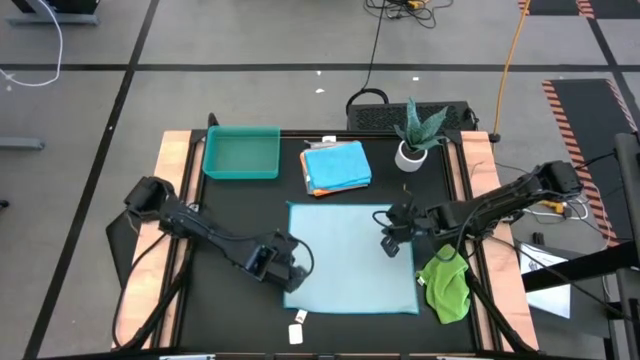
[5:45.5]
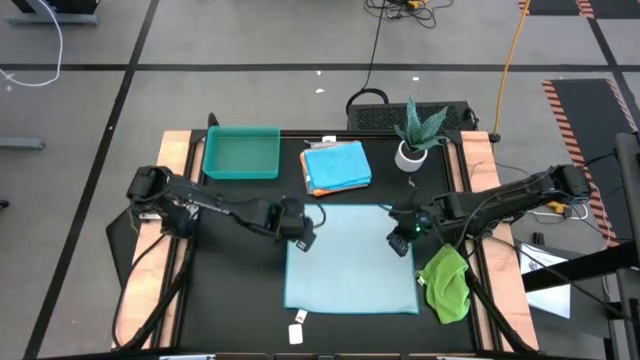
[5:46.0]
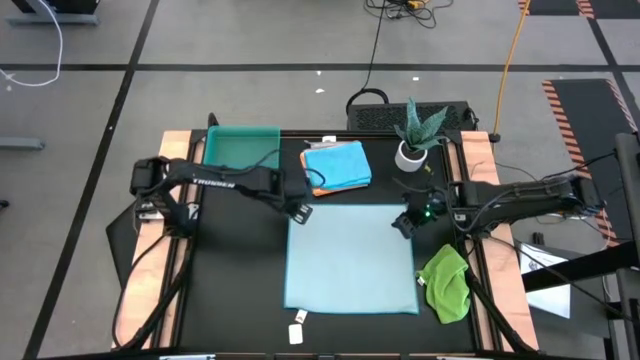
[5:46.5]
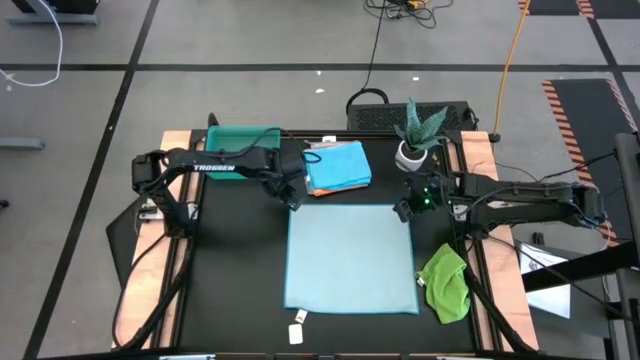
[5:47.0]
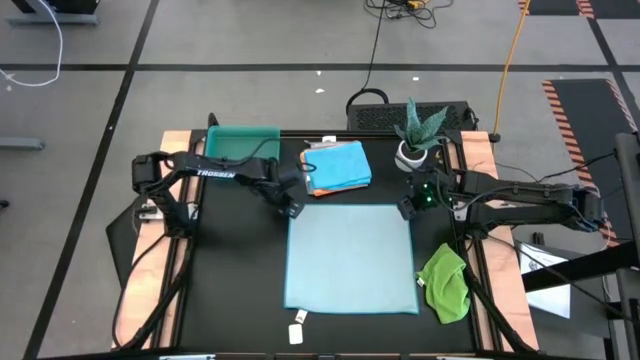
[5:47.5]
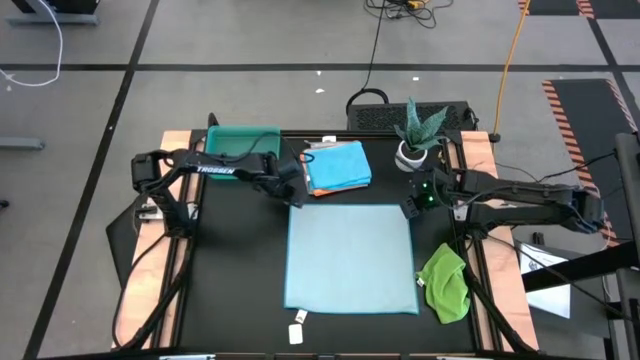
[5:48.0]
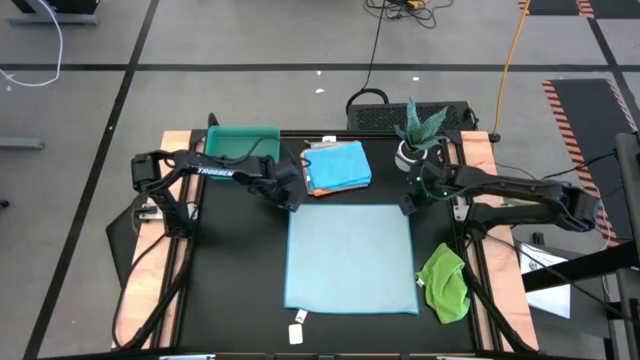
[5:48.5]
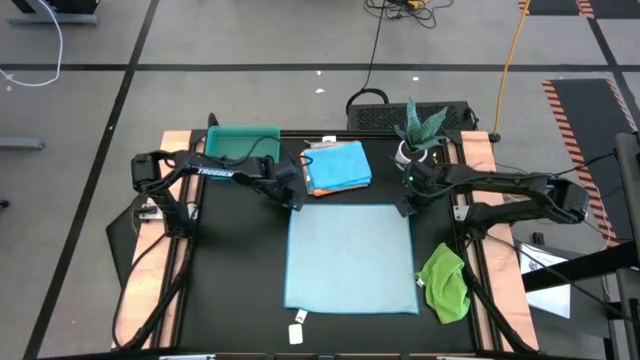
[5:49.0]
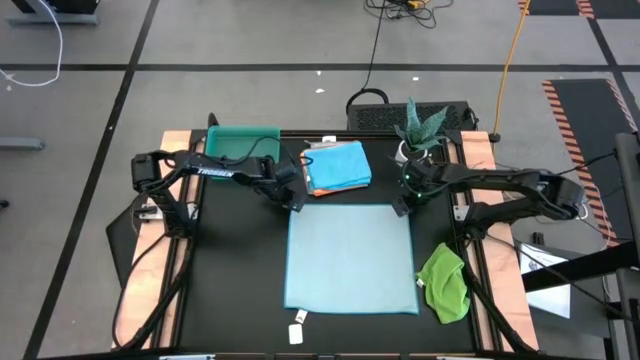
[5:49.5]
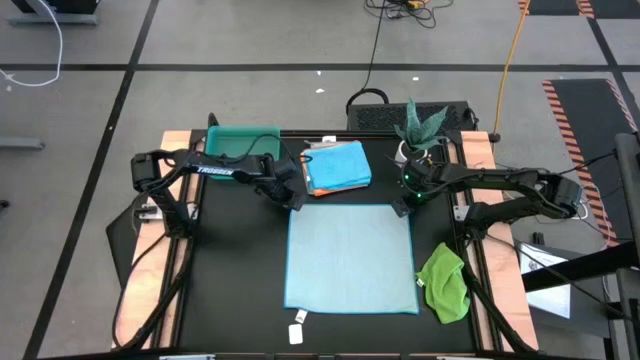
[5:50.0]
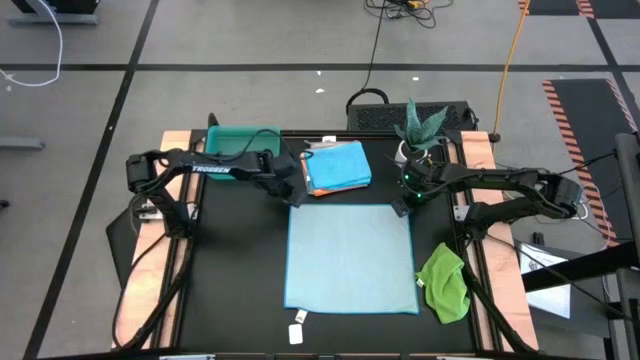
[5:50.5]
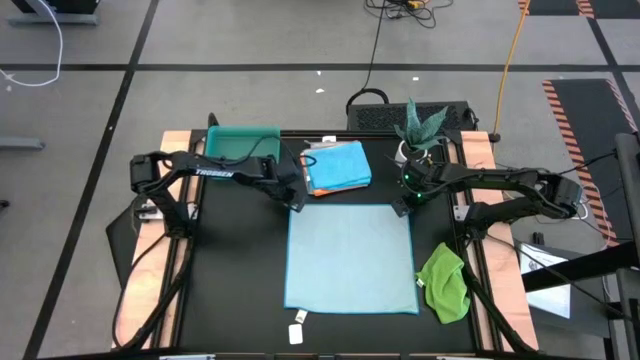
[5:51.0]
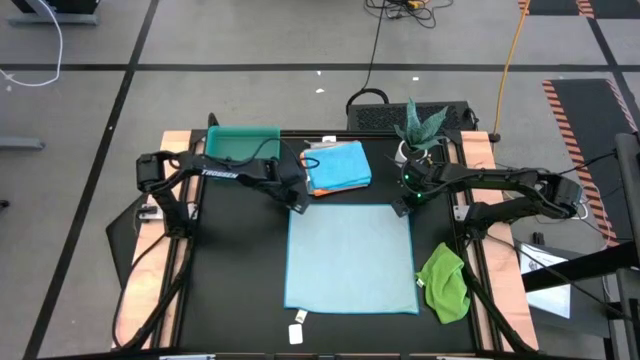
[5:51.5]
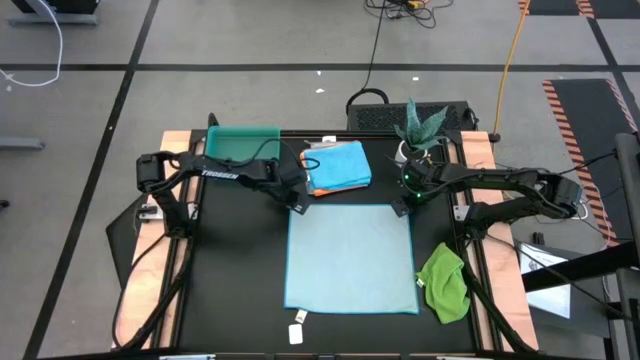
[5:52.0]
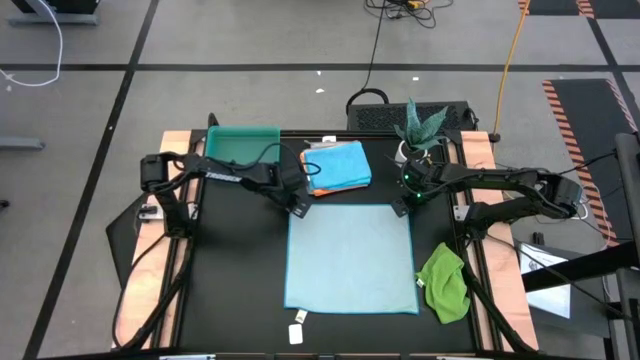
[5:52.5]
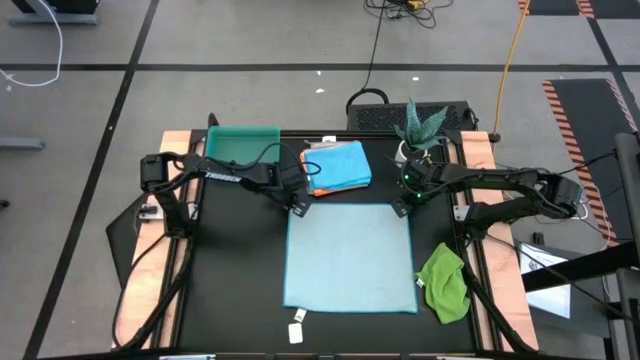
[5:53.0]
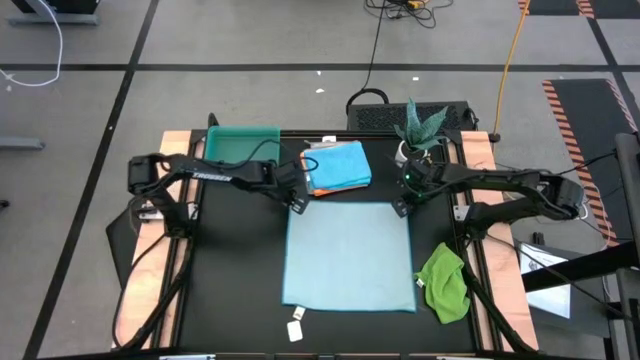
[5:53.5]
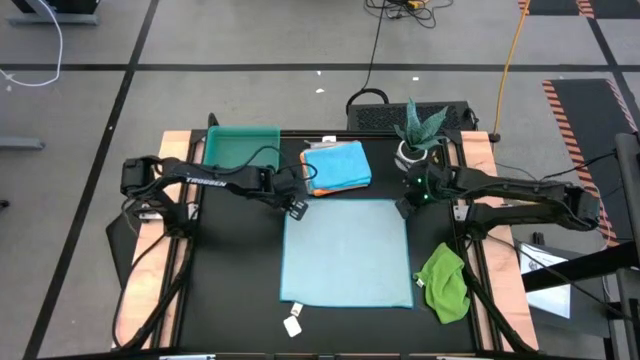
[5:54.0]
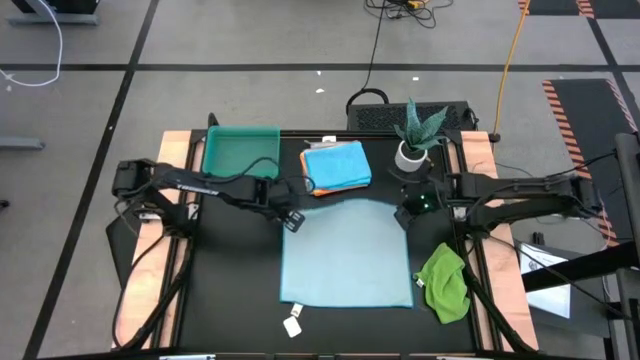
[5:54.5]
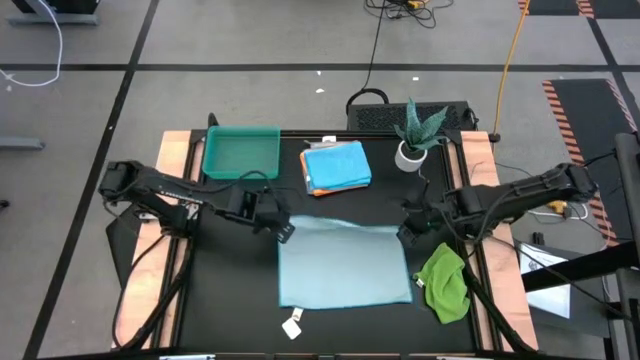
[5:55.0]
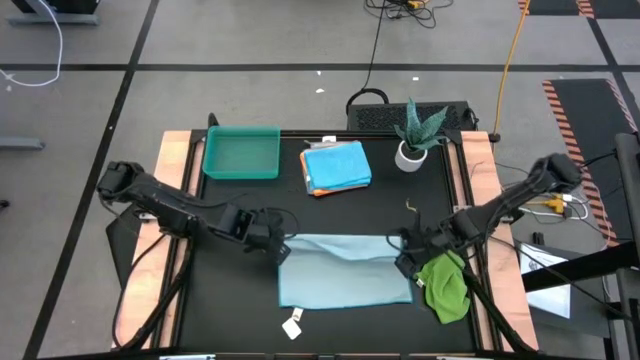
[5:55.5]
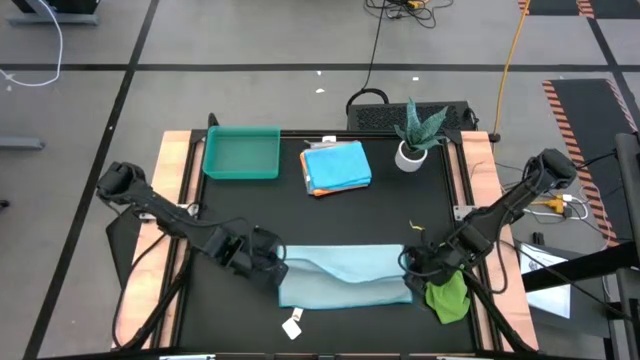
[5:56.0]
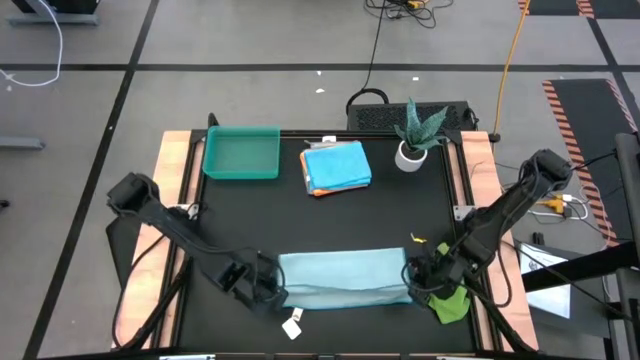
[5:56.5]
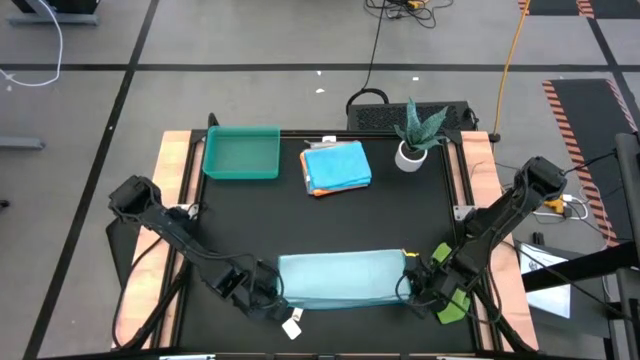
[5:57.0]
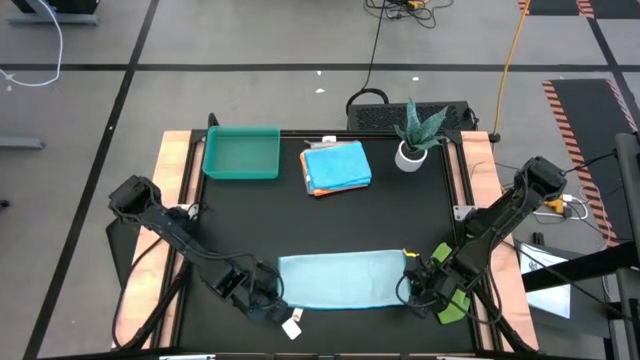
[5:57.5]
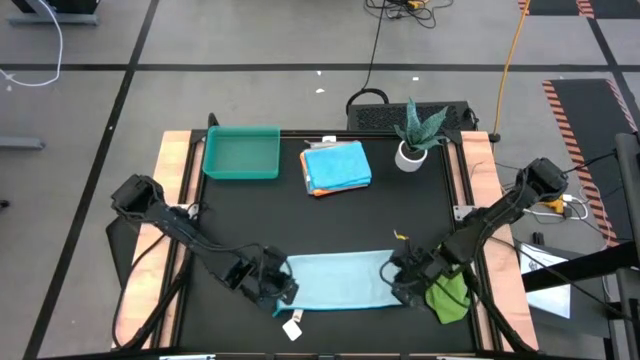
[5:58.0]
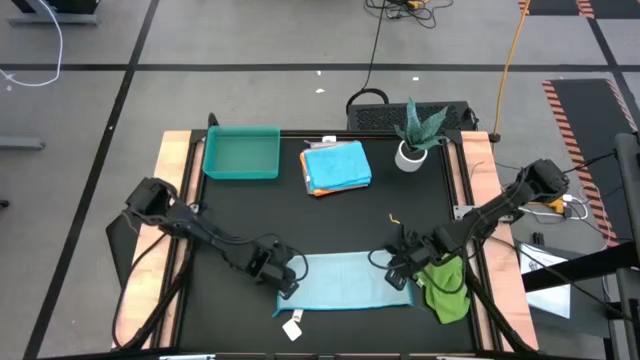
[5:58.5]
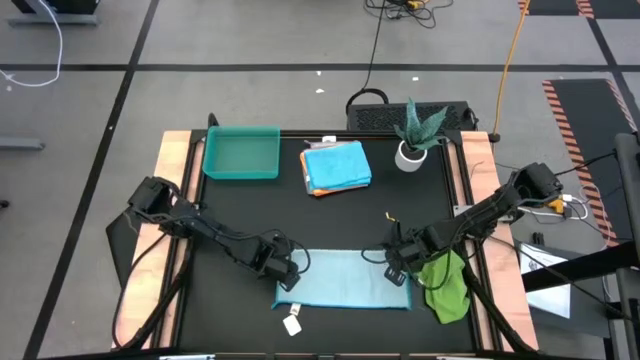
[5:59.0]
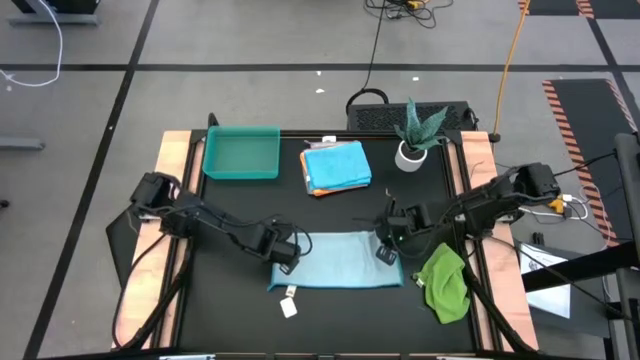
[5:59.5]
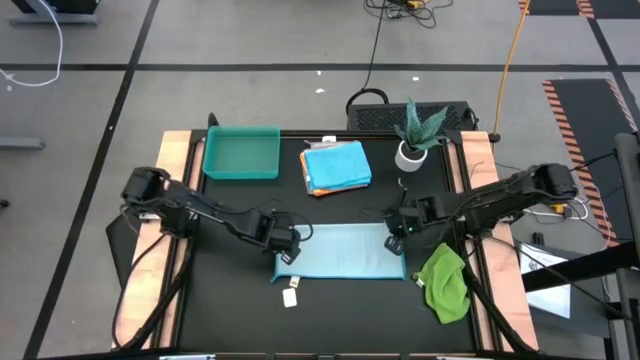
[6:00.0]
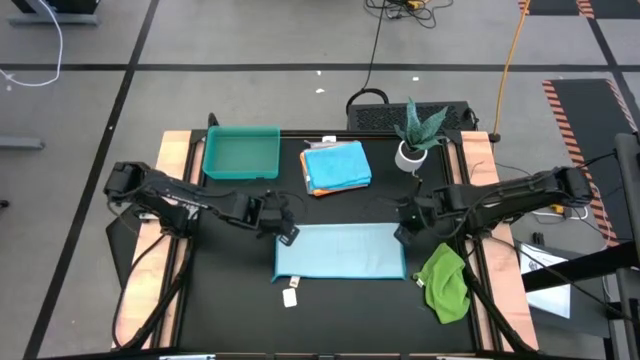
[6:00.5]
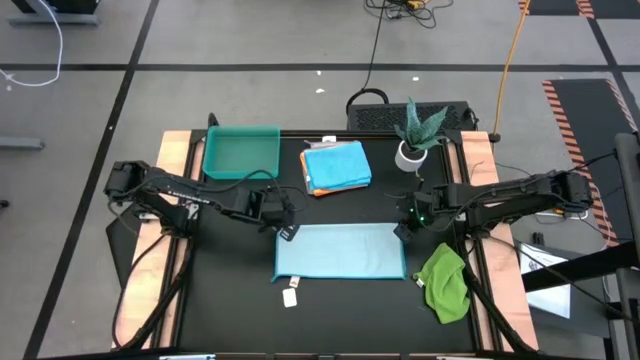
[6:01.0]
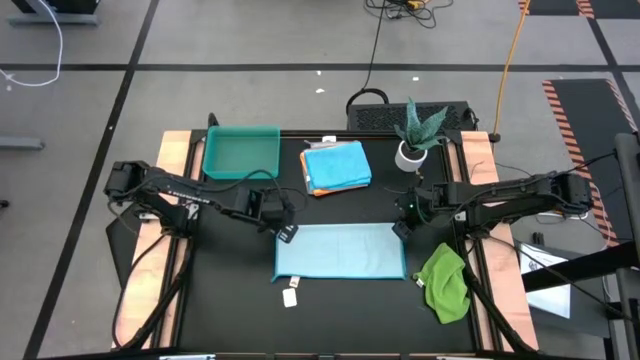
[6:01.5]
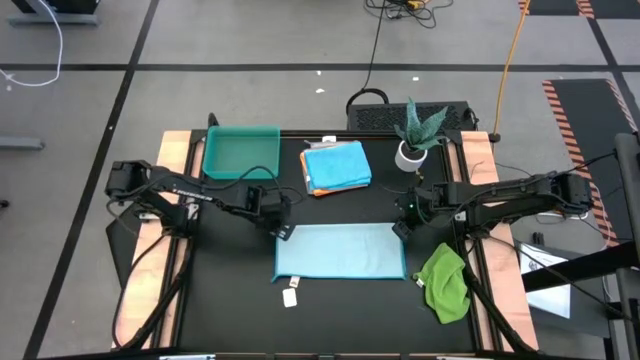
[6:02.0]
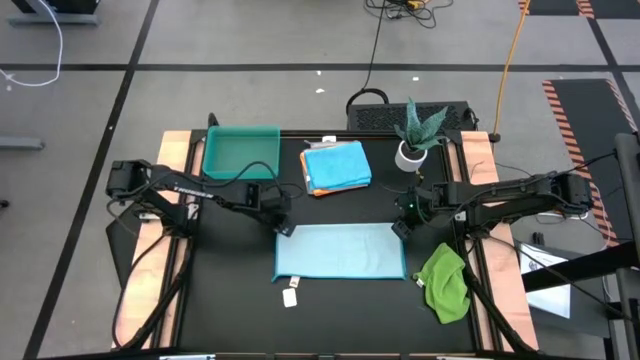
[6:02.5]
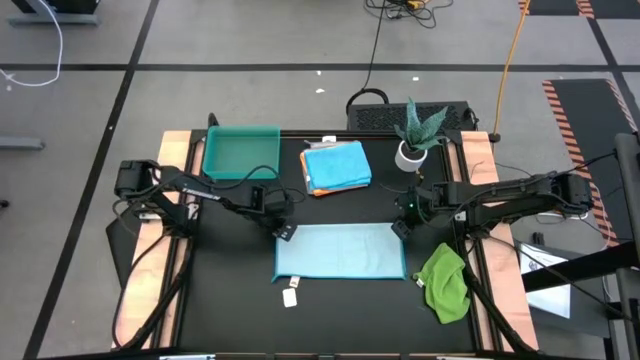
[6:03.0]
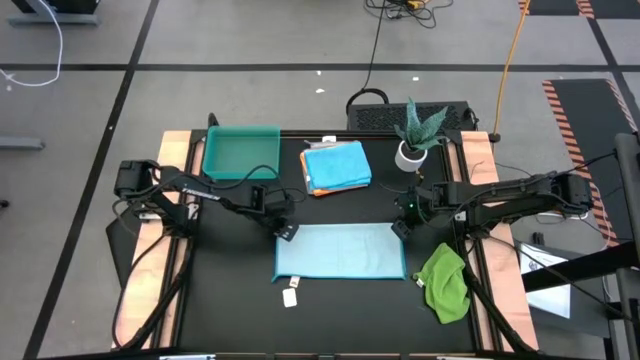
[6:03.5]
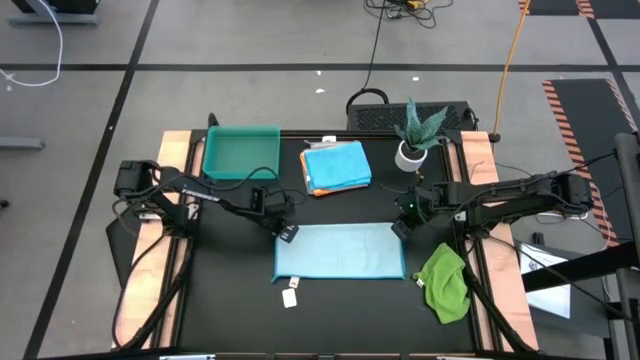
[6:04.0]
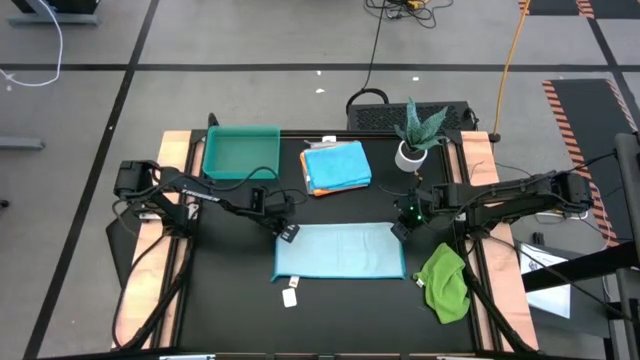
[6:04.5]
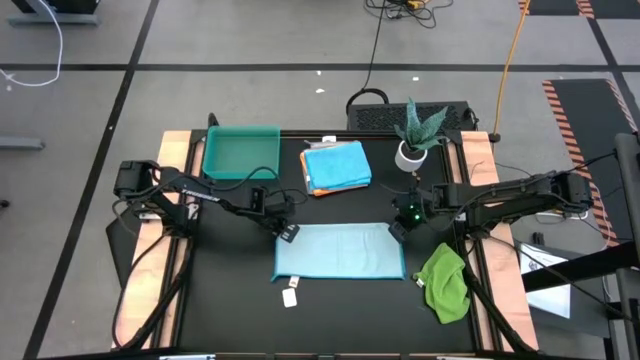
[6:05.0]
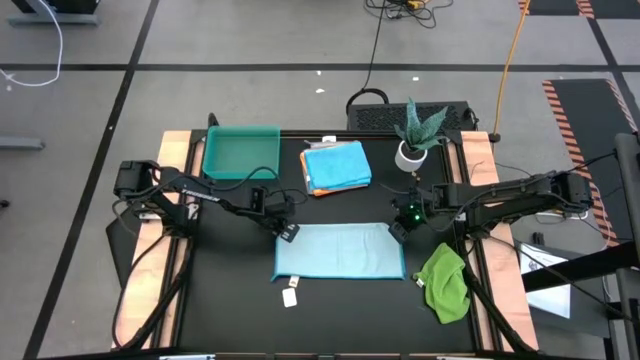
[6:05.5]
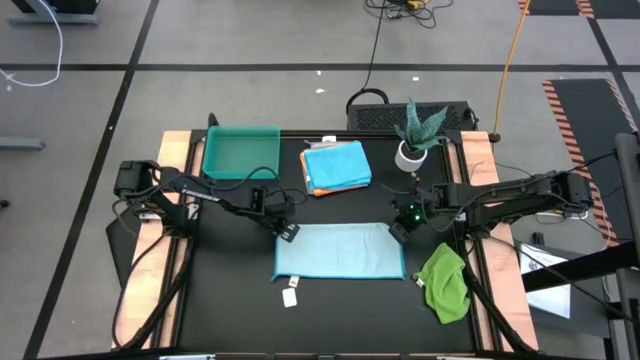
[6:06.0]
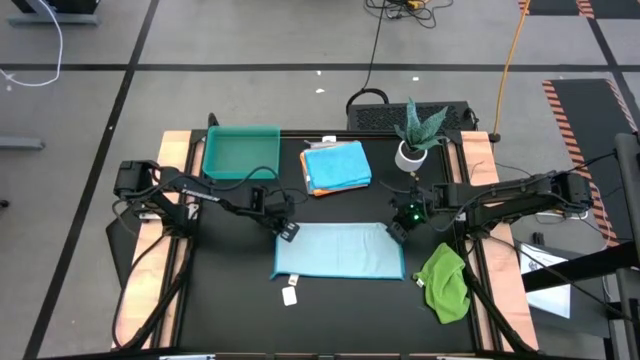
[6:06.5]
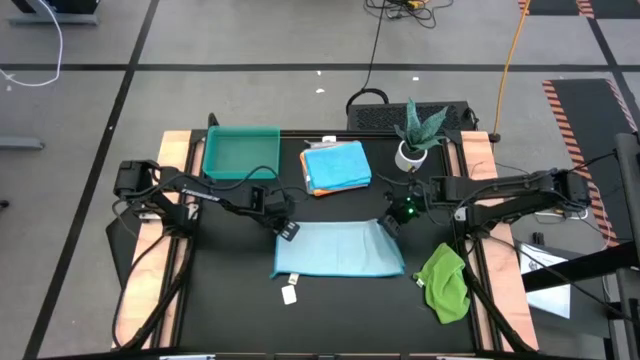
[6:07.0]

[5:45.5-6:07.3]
Task: Fold microfiber towels
Fold the light blue microfiber towel
